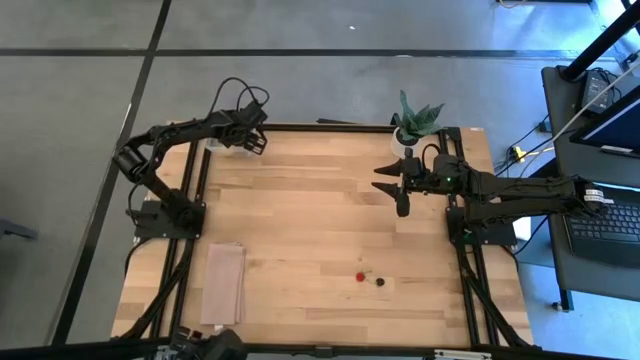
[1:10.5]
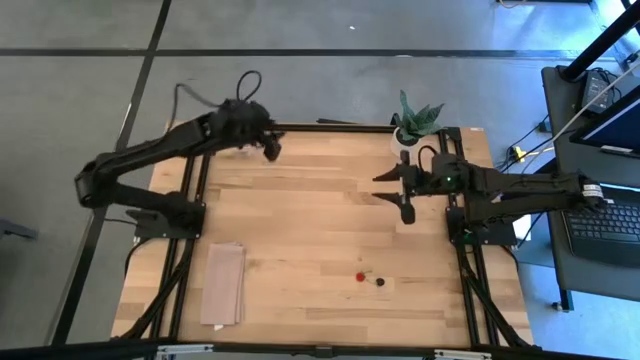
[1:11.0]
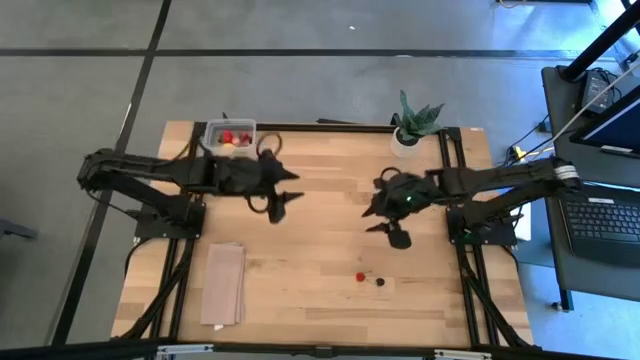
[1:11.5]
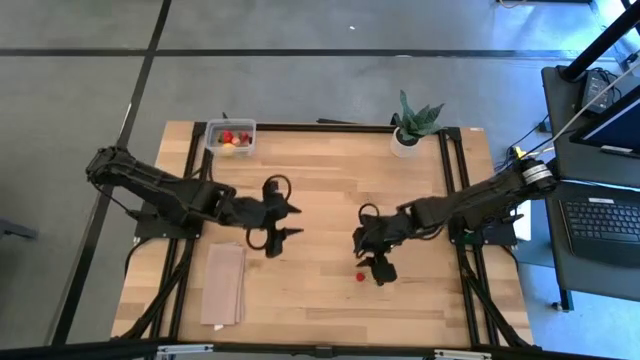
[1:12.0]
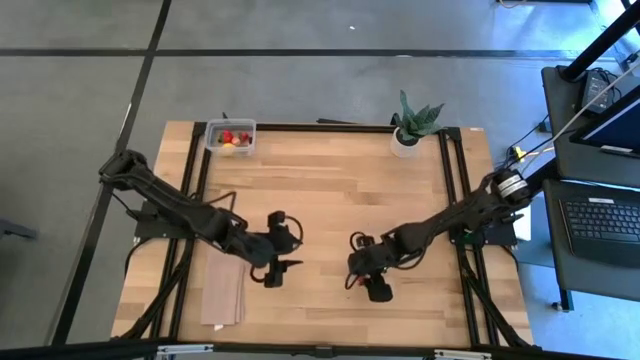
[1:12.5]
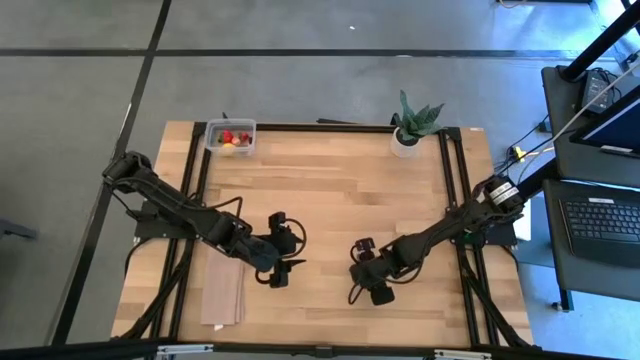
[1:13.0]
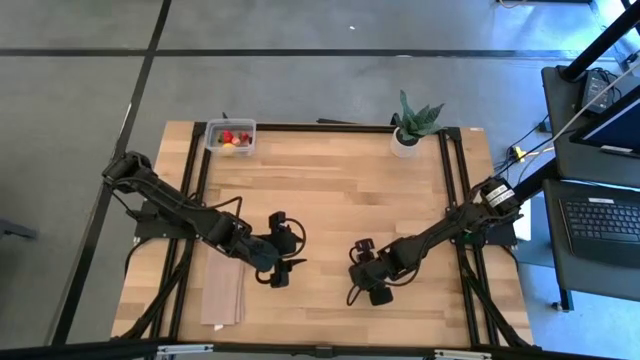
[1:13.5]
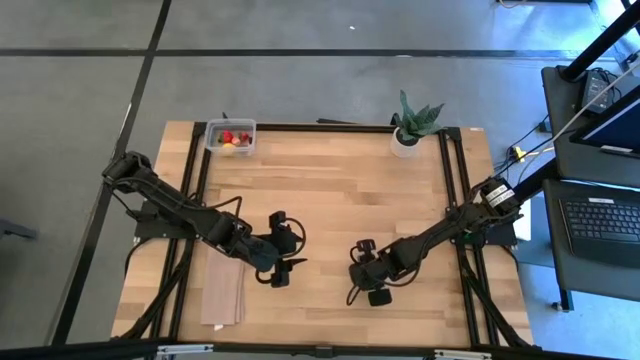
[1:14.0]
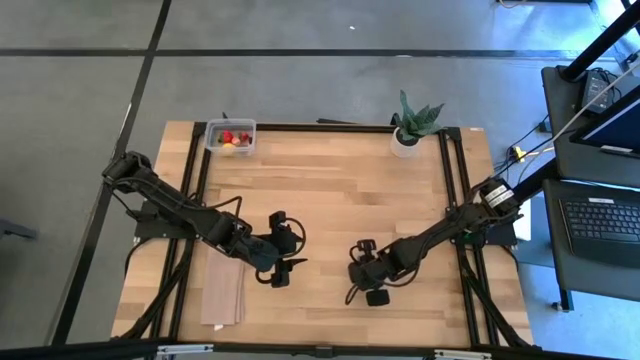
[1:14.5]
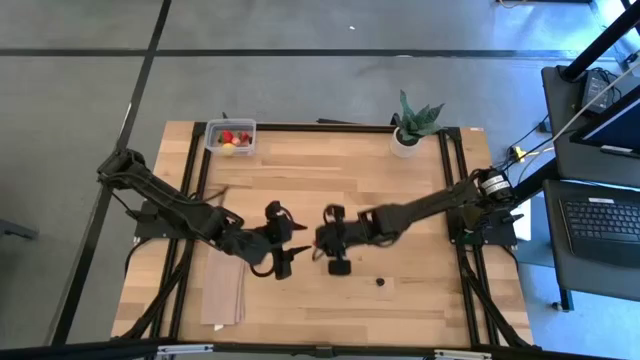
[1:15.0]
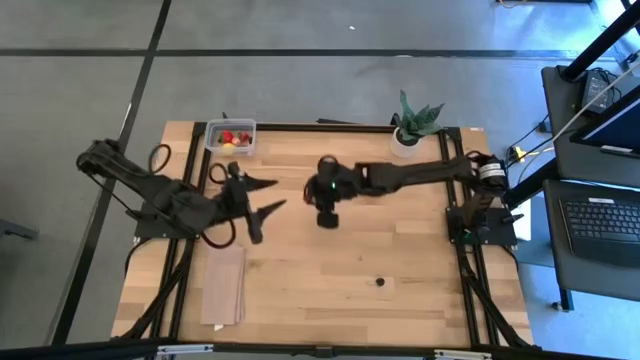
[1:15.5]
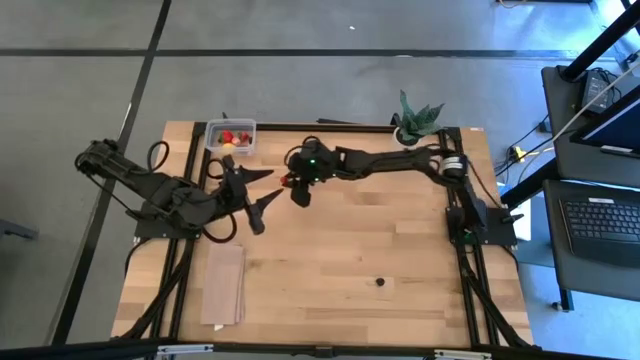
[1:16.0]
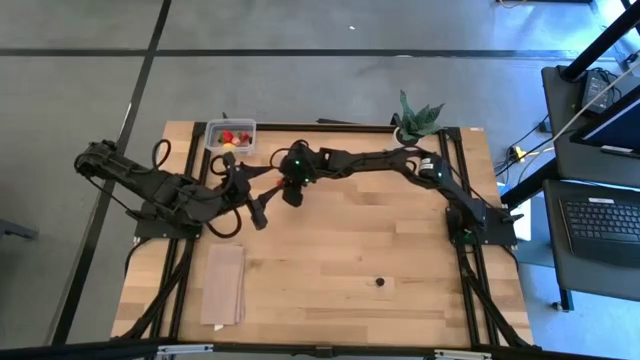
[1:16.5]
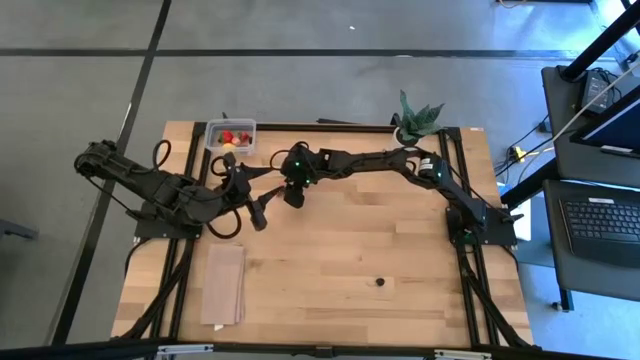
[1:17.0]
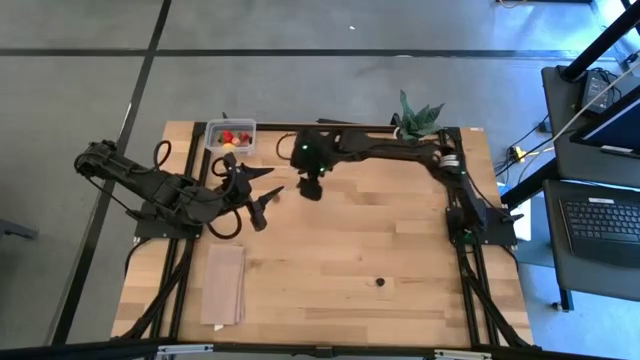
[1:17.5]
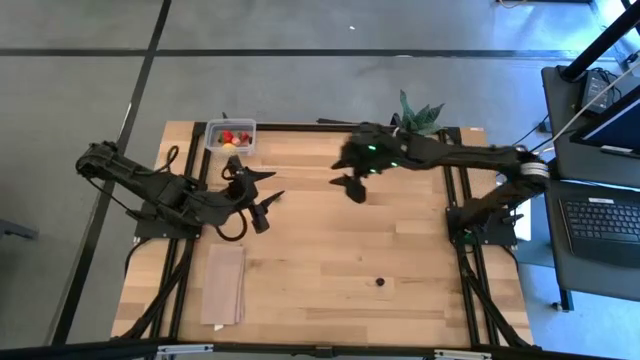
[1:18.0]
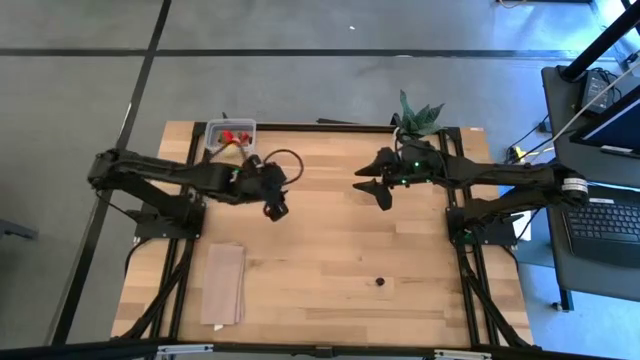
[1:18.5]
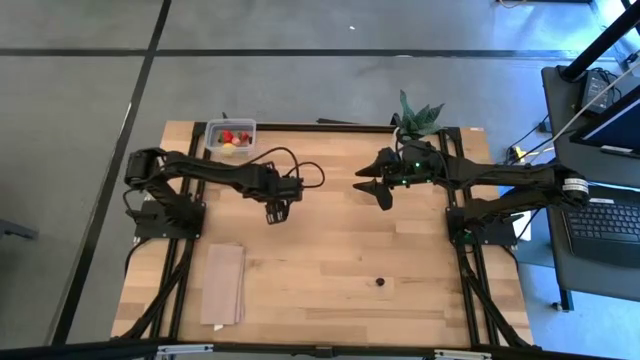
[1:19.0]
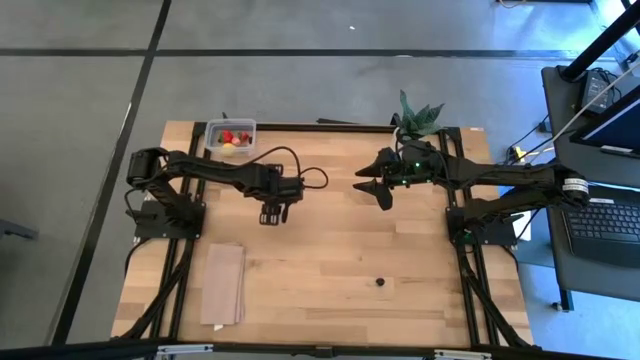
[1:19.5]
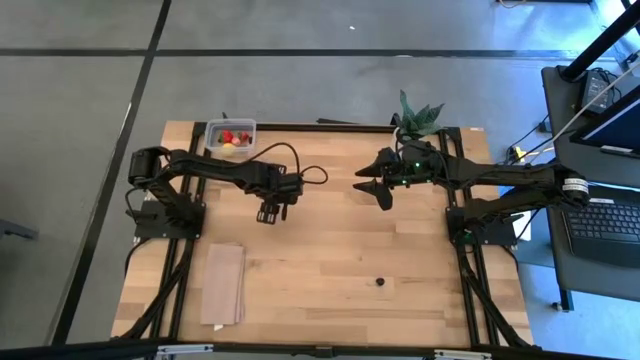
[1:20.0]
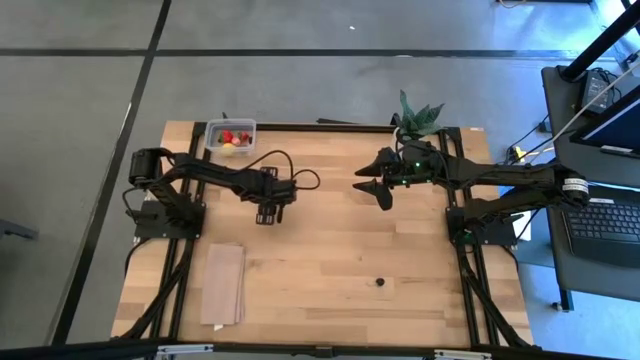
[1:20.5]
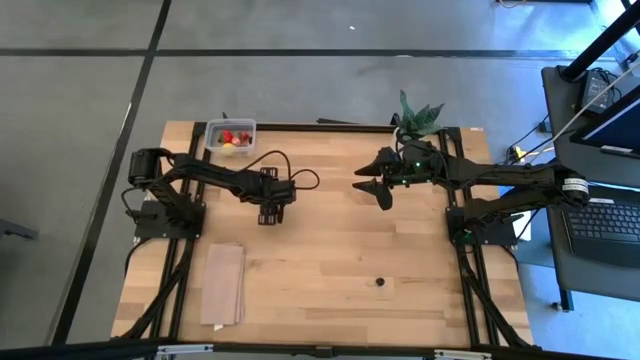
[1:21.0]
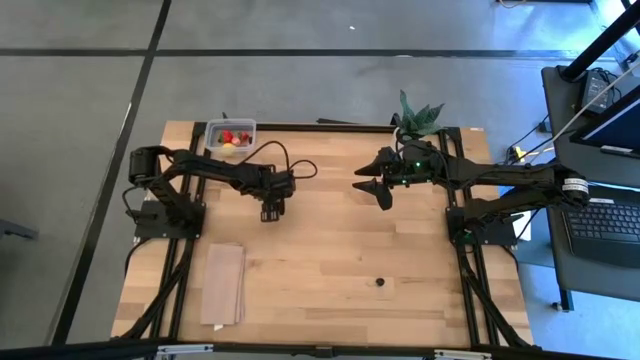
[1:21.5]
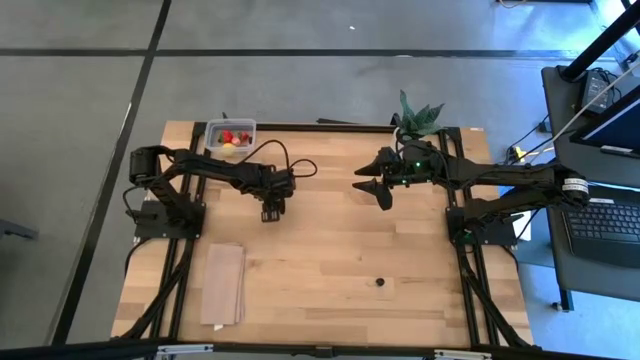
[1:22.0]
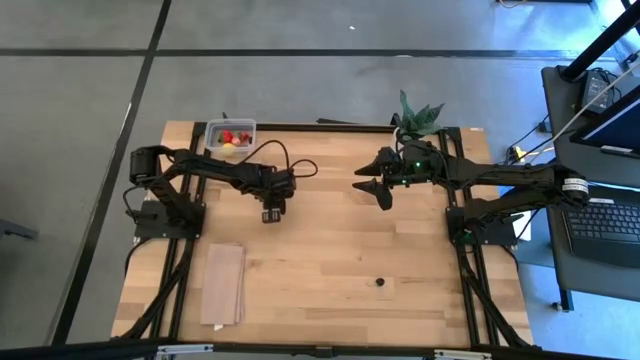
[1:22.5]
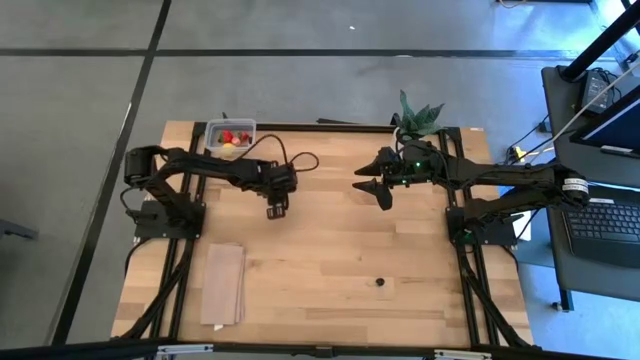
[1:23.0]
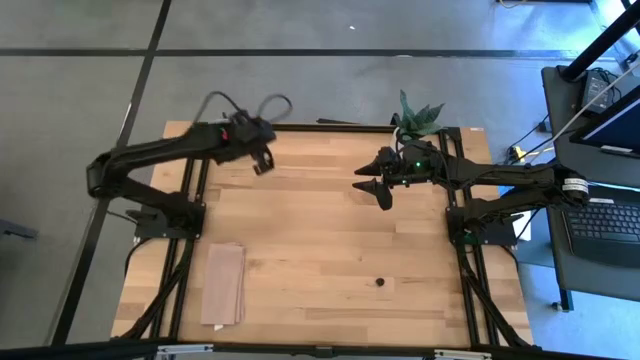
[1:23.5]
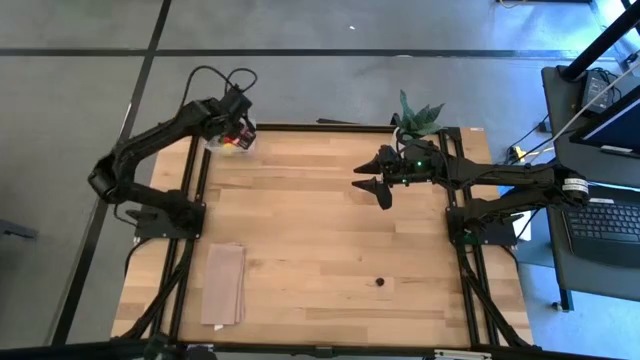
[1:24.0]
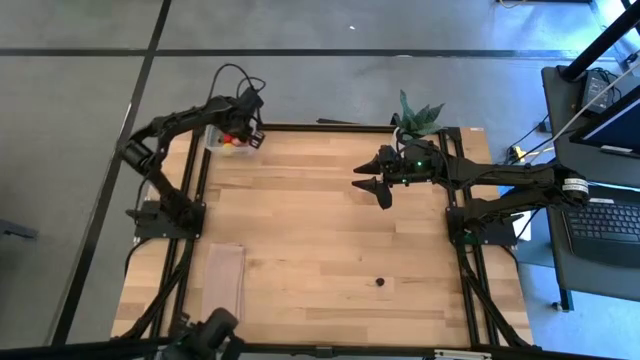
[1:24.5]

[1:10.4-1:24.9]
Task: Pick and placing Produce into tupperware
Put the red strawberry into the transparent container

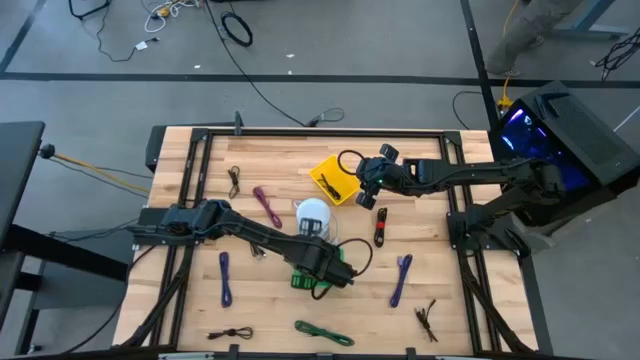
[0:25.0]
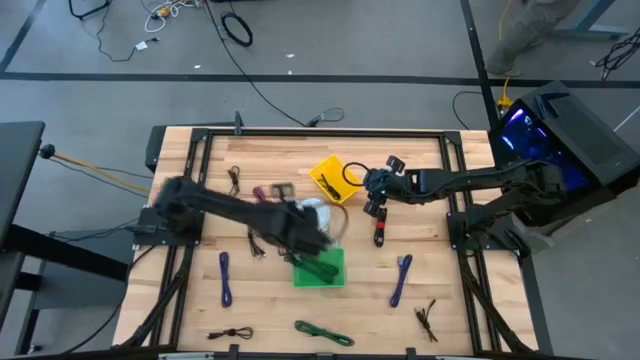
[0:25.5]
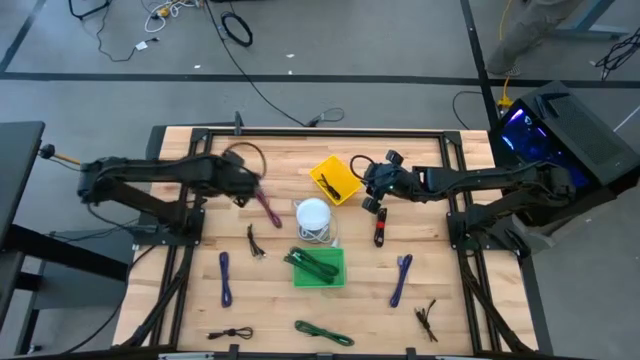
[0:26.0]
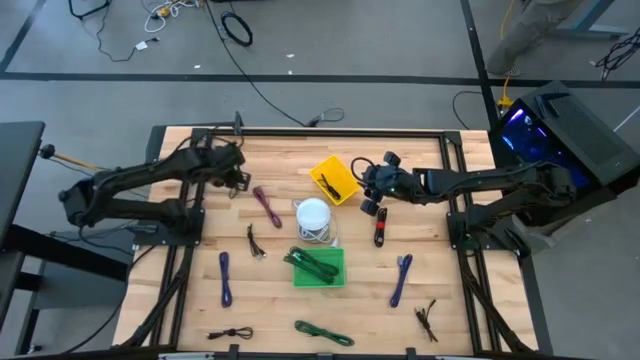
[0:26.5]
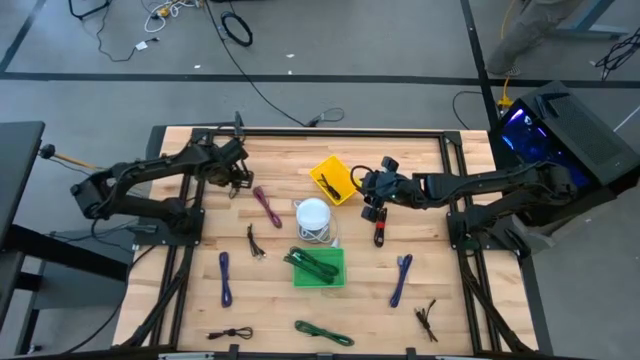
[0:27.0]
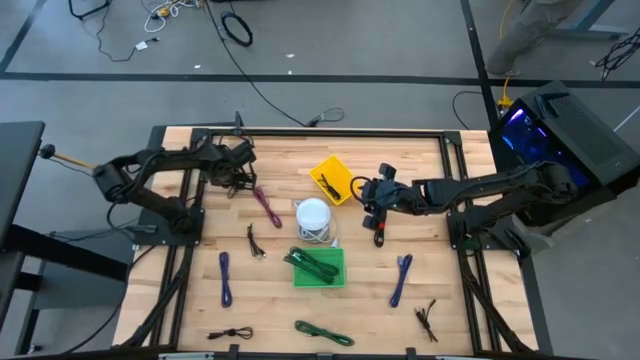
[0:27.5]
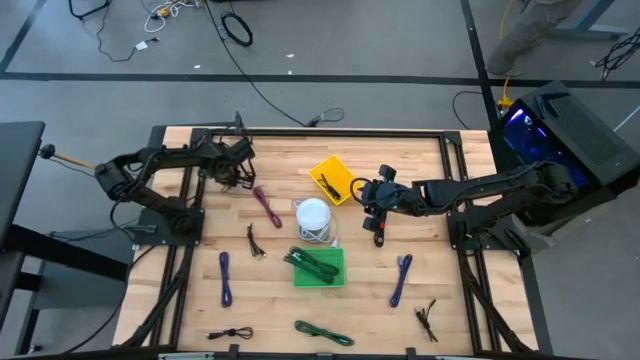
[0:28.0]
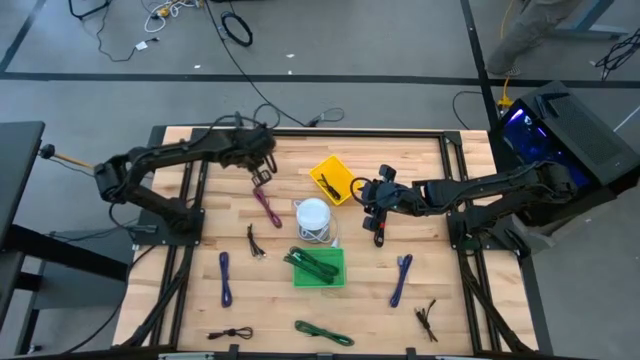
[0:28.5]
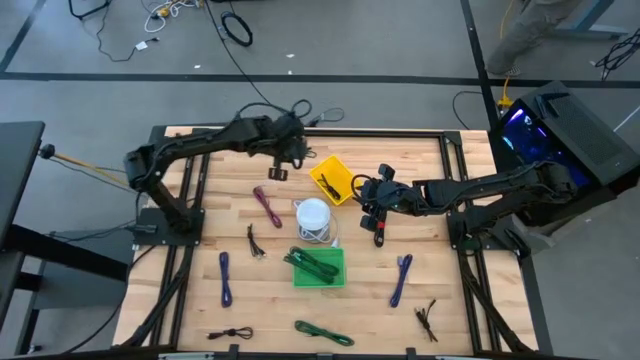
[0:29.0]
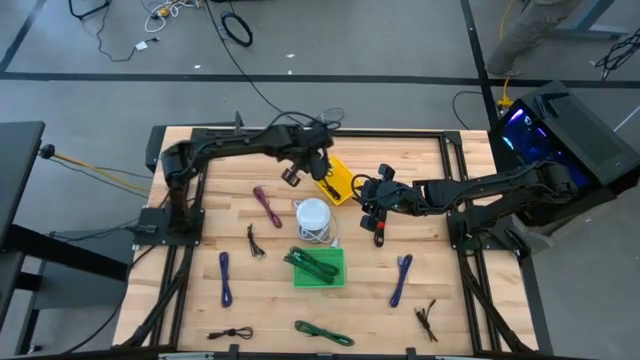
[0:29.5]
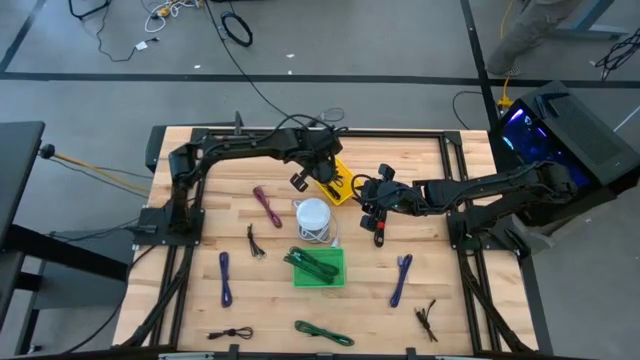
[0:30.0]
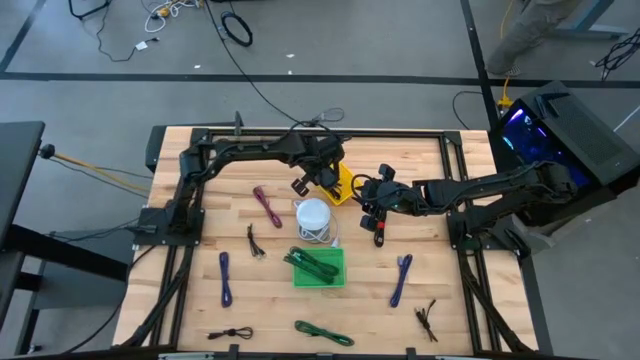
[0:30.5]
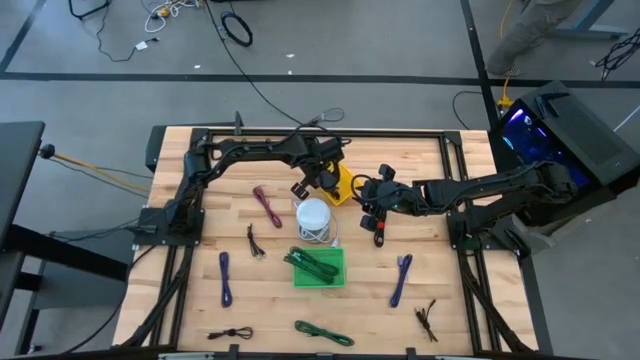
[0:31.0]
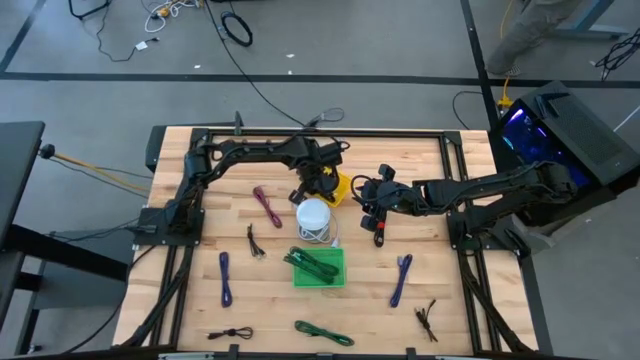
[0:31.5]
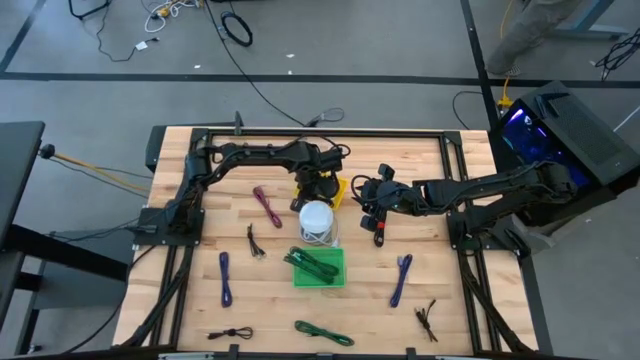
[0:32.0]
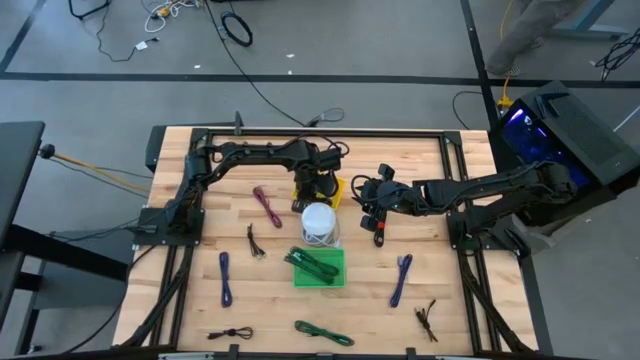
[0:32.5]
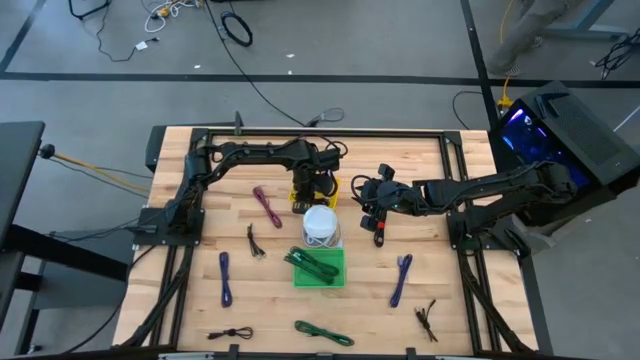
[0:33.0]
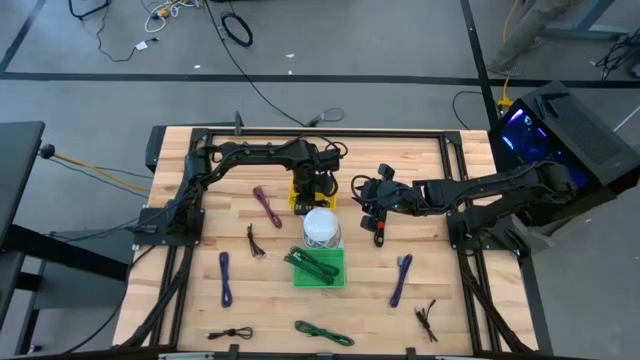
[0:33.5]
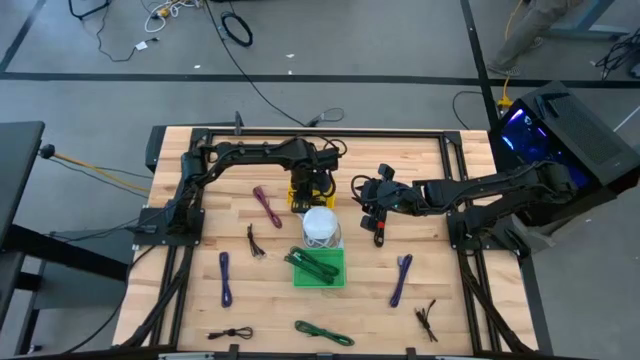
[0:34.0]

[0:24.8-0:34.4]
Task: Pick & Place USB Port
Put the black USB cable into the yellow bin
